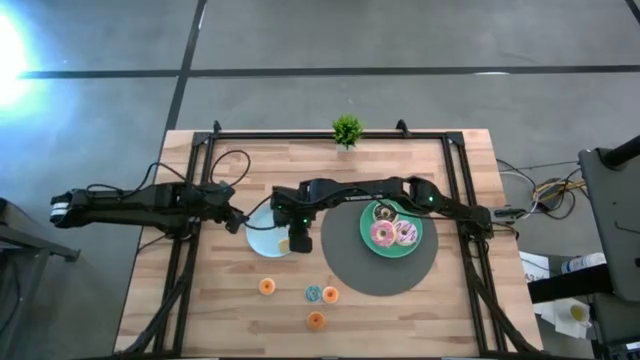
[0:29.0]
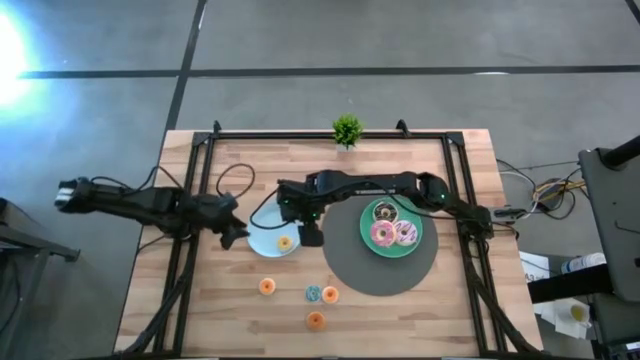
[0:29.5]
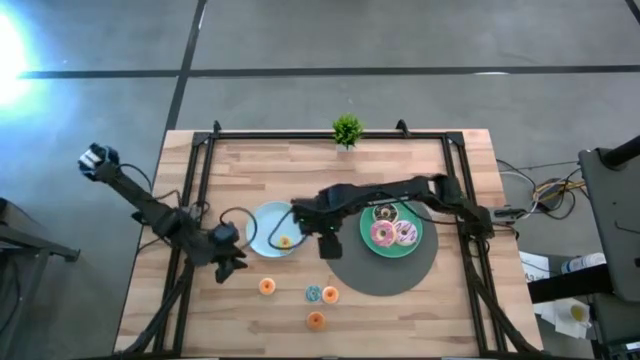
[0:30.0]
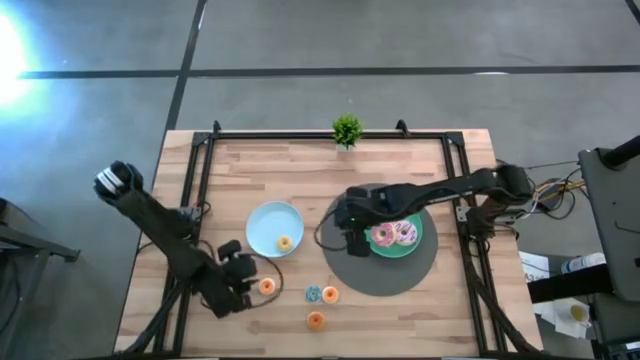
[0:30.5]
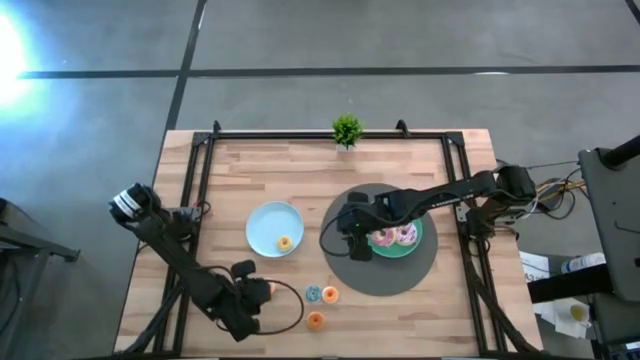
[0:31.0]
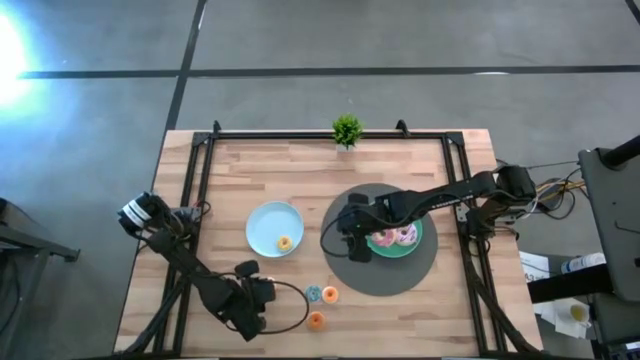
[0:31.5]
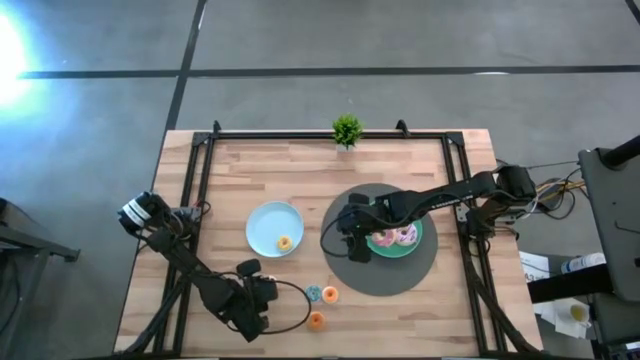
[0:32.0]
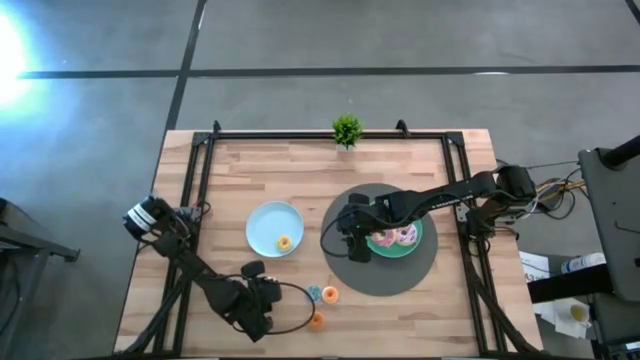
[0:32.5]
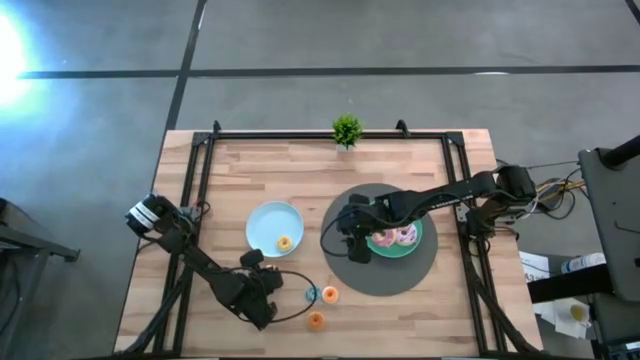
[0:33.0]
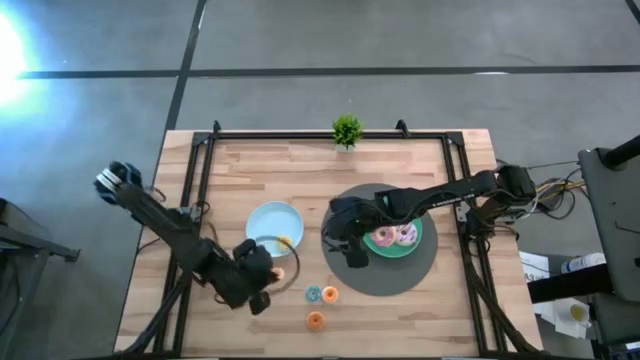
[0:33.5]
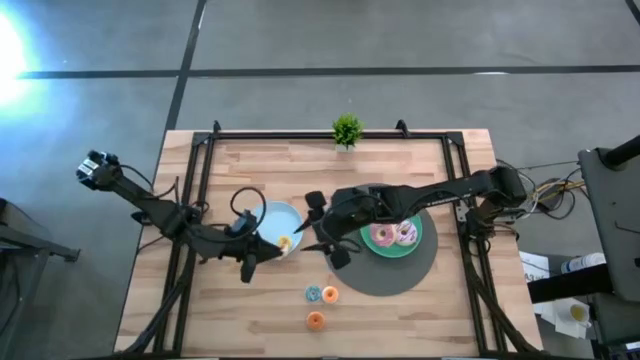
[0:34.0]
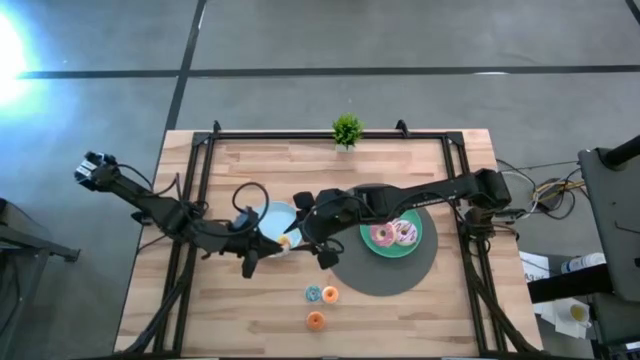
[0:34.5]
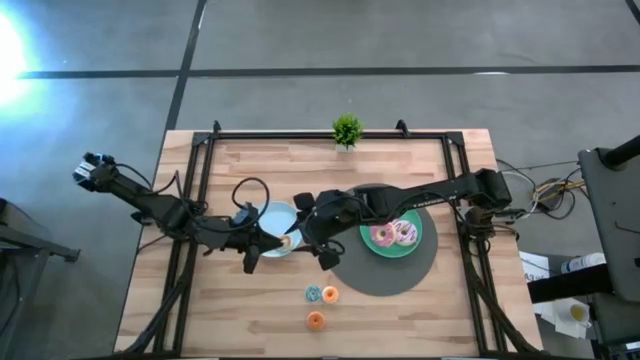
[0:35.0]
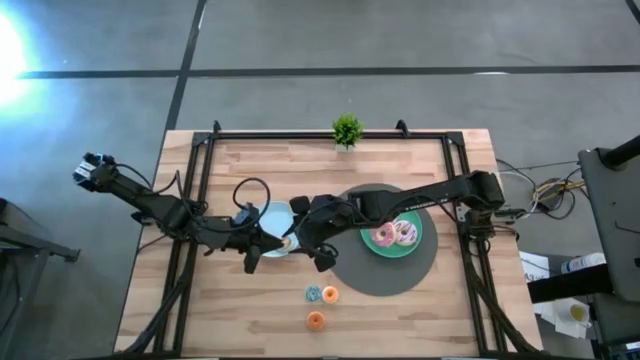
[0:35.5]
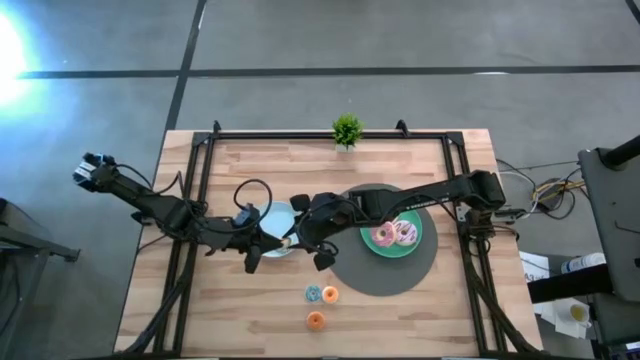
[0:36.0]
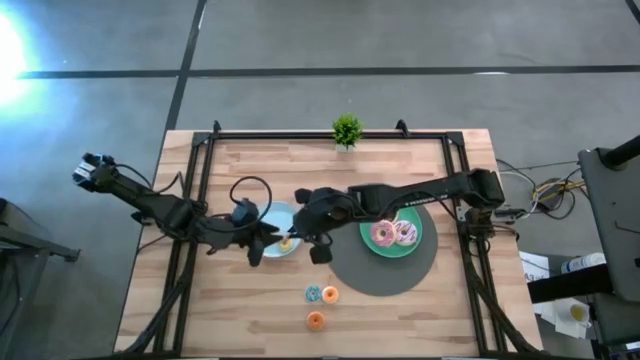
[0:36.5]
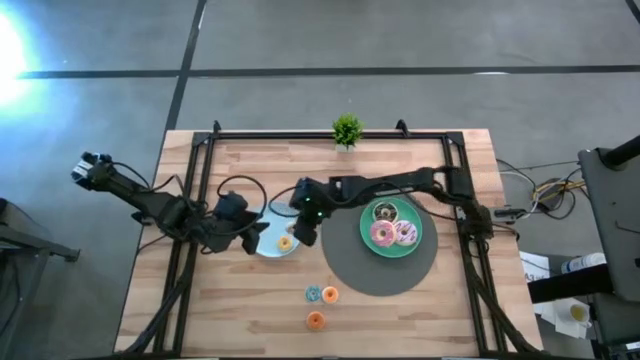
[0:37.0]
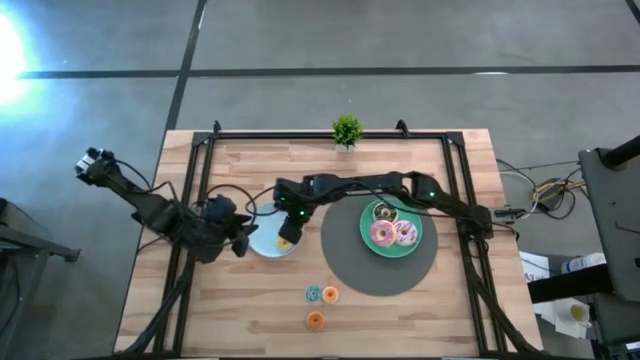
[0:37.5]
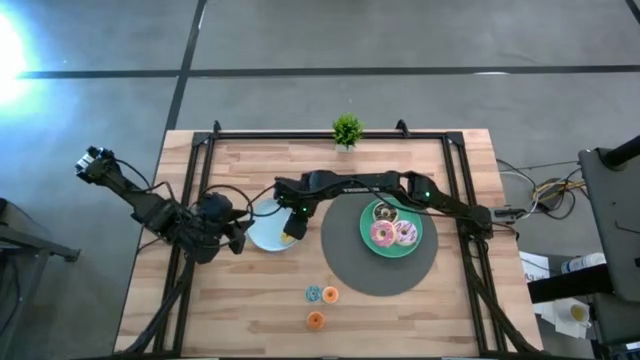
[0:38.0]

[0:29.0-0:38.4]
Task: Pick & Place donuts
Put the small white donut on the blue plate

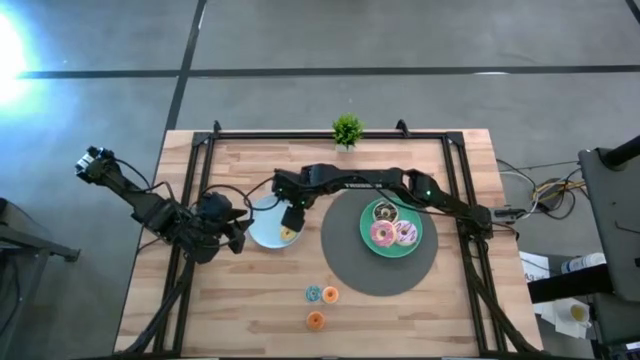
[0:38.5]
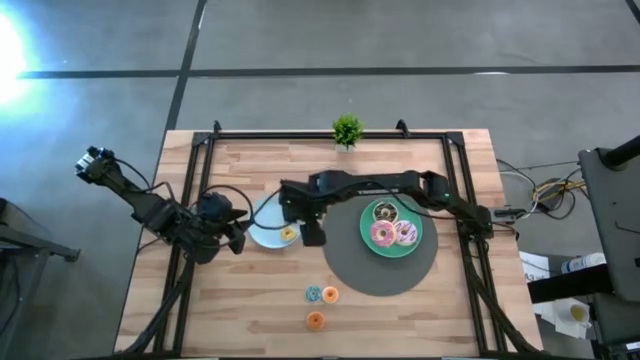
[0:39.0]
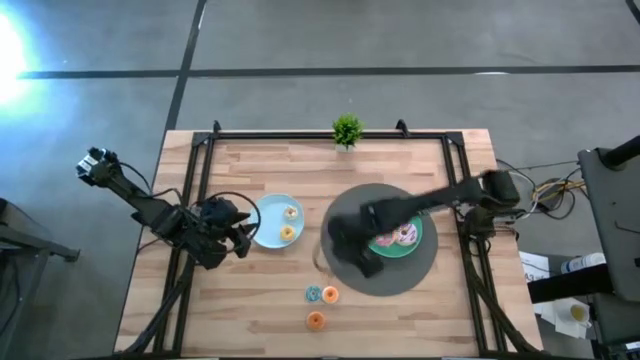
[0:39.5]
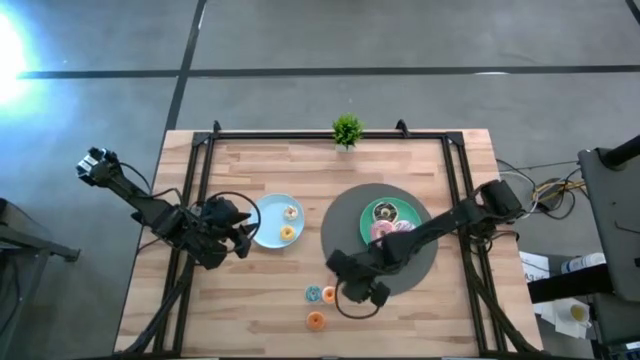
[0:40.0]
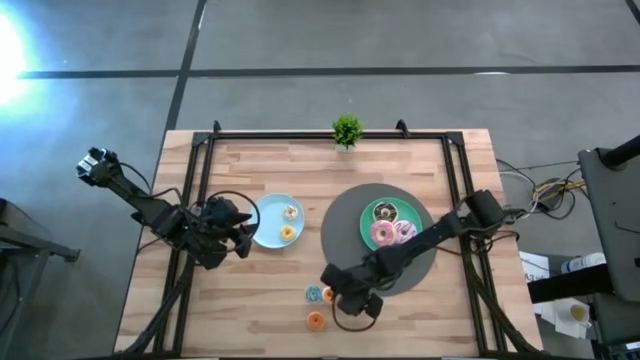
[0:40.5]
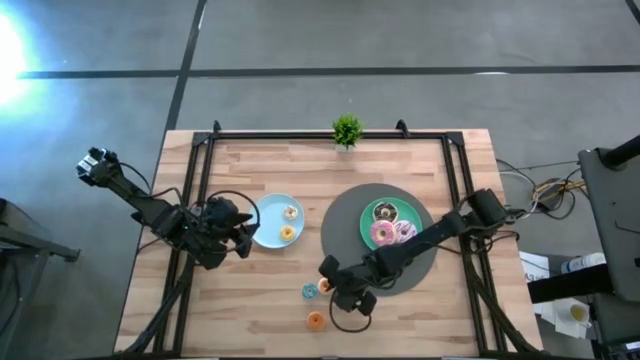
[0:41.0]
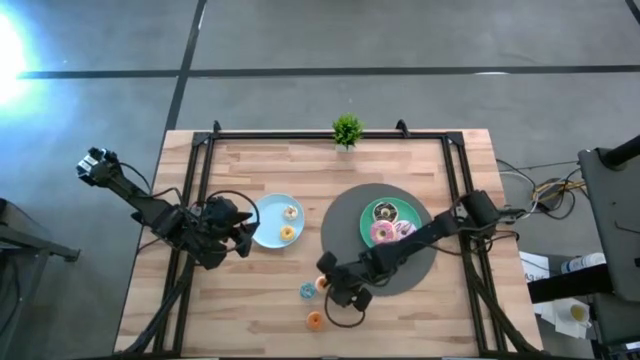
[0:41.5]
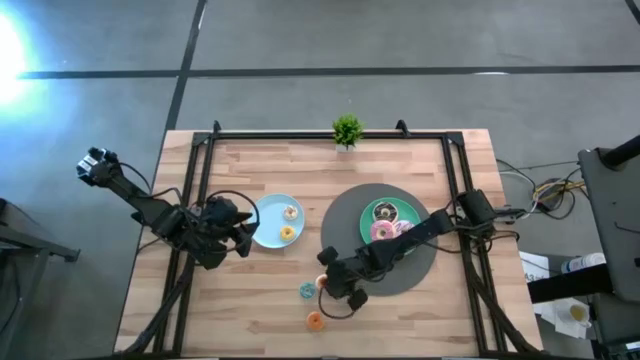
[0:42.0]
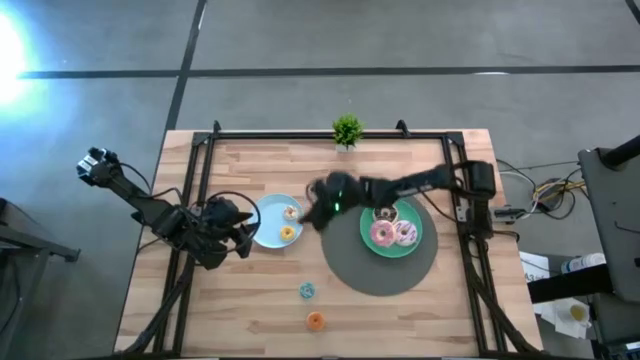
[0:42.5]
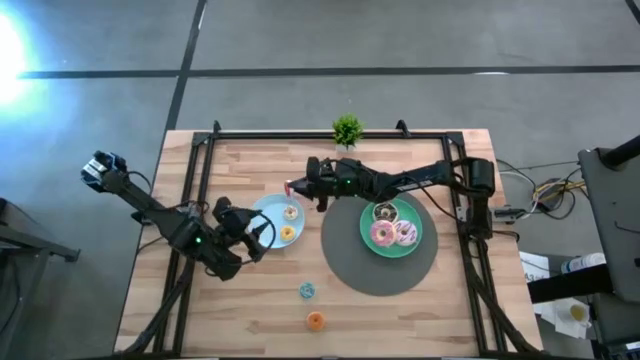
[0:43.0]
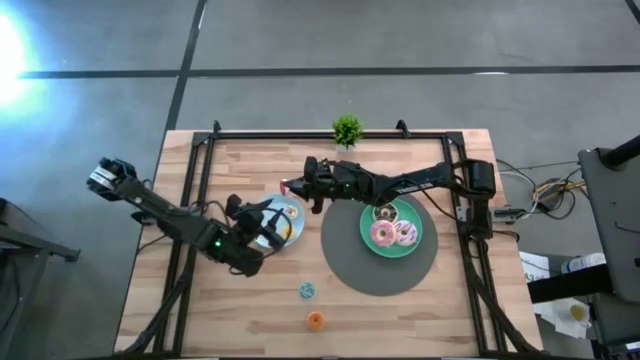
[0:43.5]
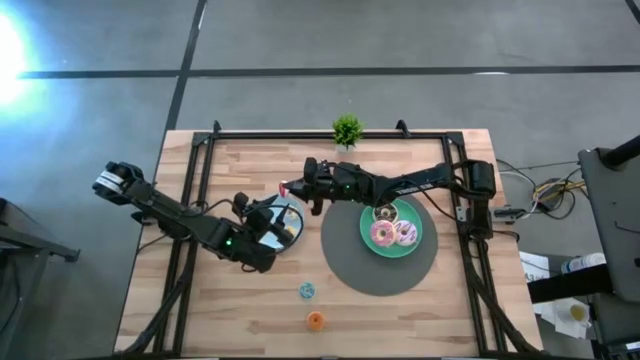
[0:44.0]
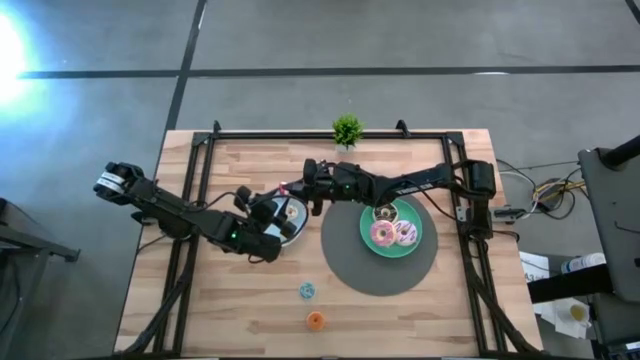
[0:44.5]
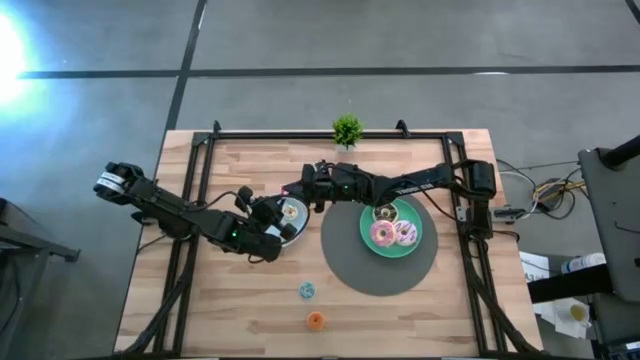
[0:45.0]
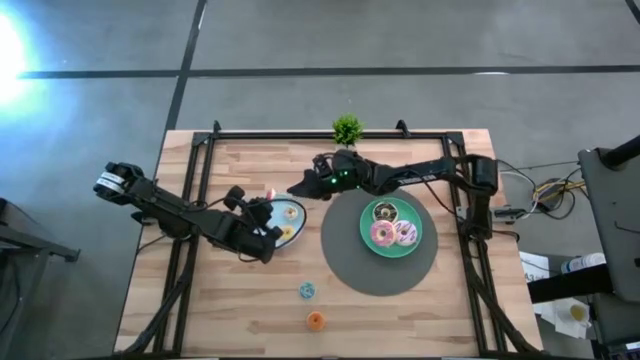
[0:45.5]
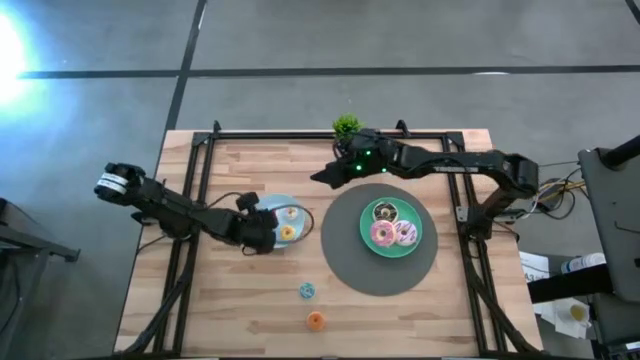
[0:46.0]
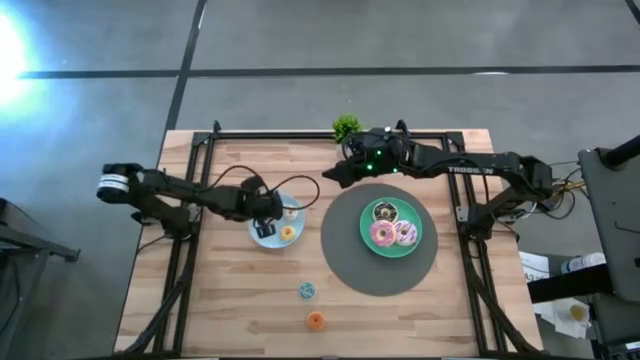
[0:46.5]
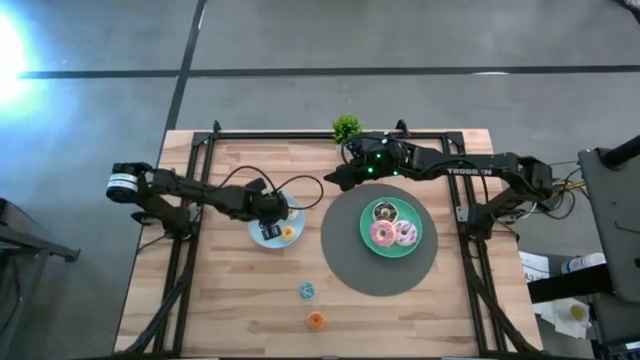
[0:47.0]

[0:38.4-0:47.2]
Put the small red donut on the blue plate

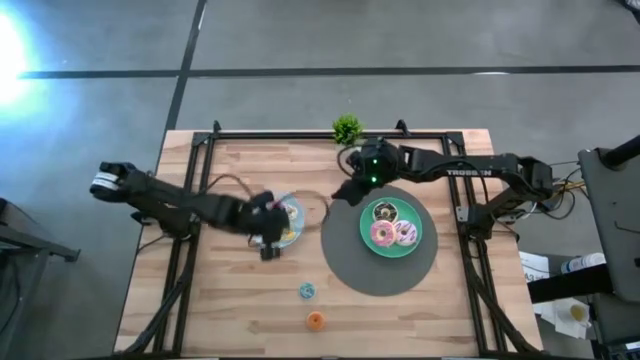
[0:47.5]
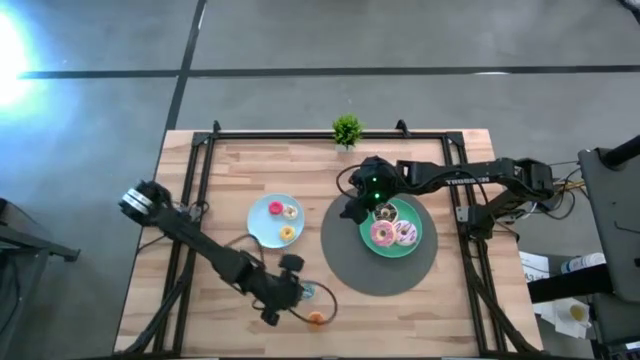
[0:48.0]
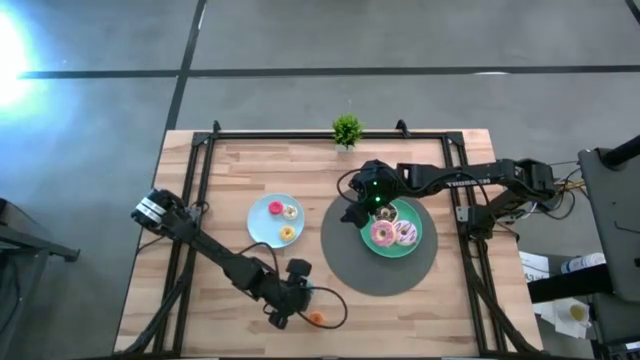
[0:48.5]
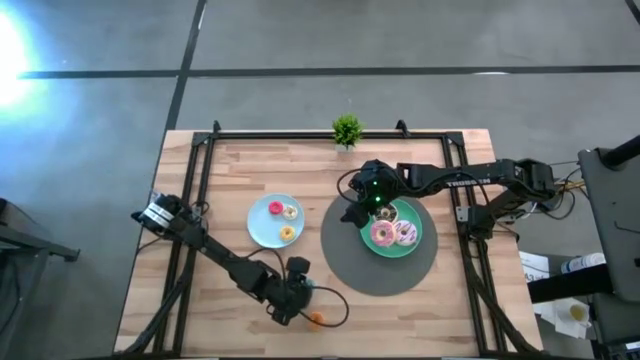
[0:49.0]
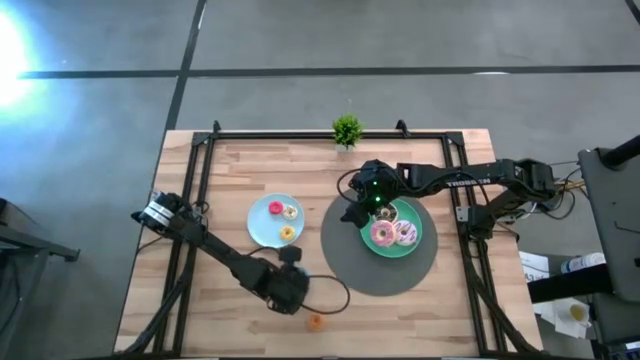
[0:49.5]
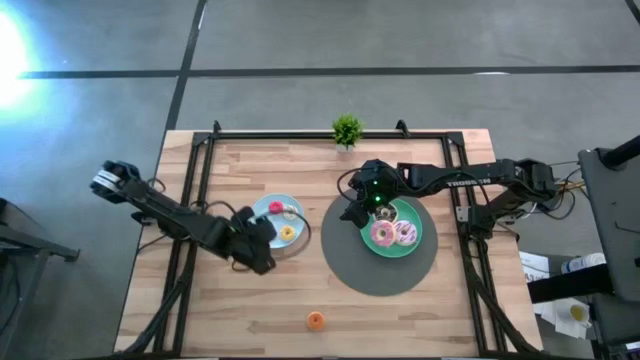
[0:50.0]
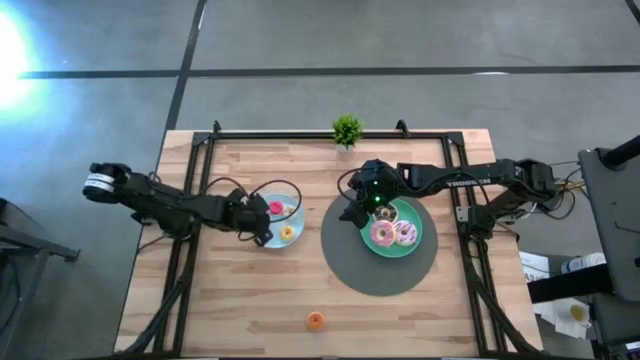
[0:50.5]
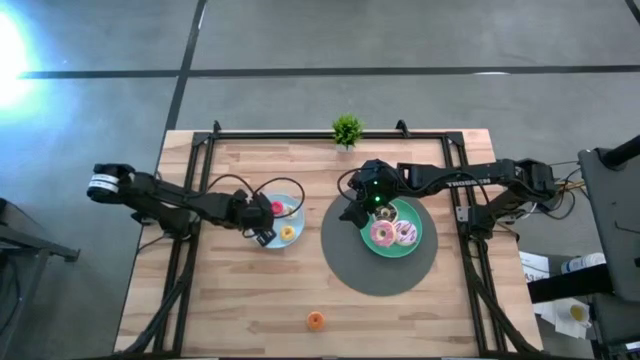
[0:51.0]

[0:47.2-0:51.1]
Put the small blue donut on the blue plate
